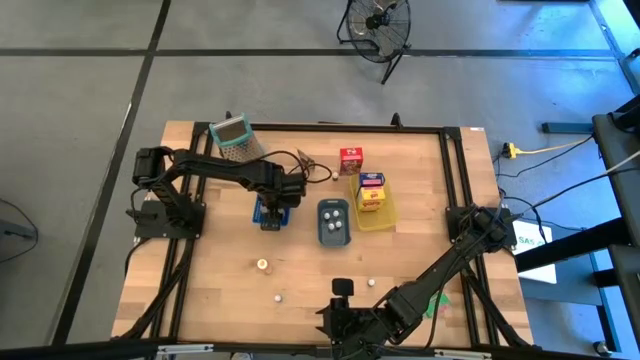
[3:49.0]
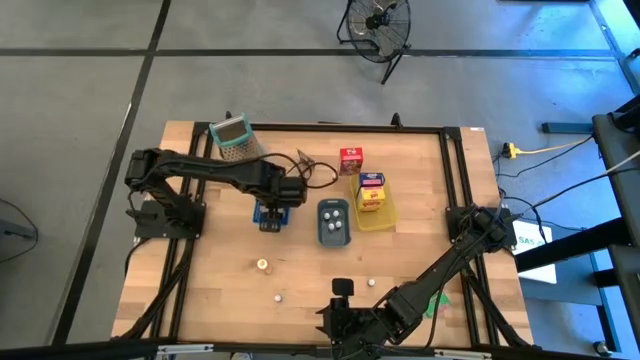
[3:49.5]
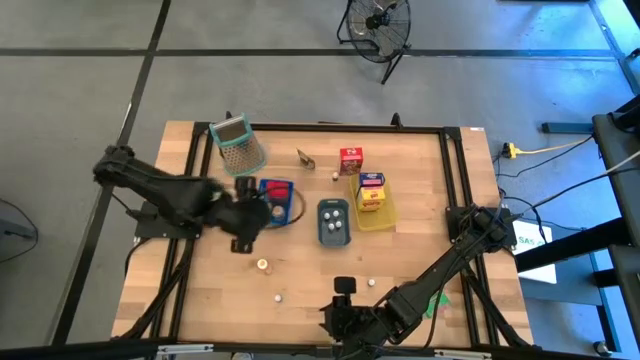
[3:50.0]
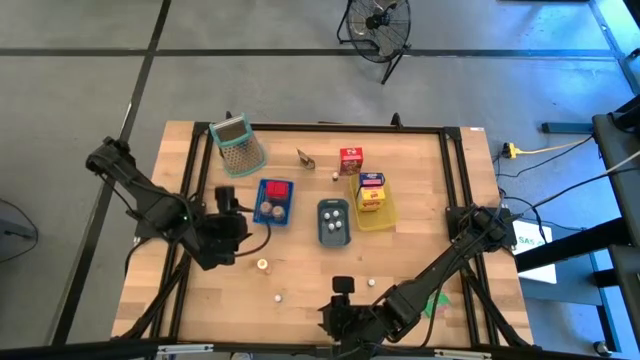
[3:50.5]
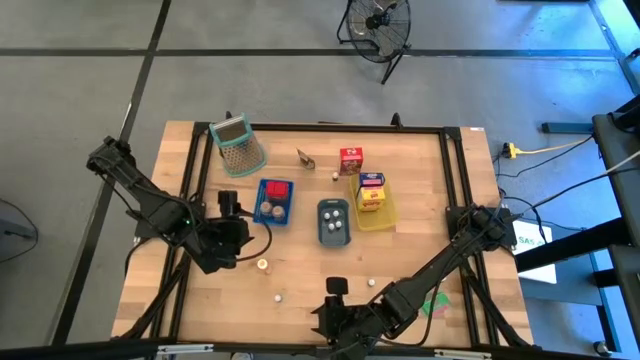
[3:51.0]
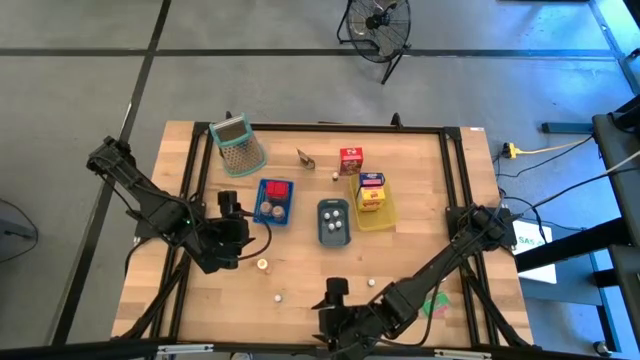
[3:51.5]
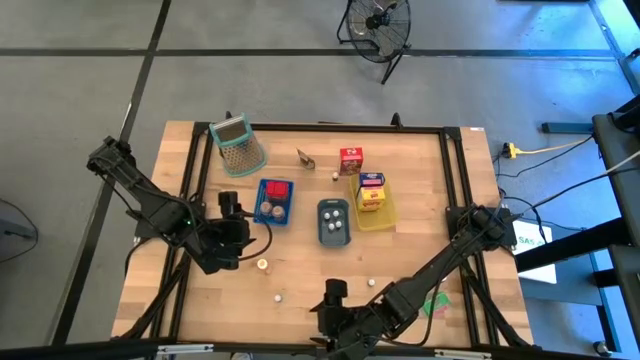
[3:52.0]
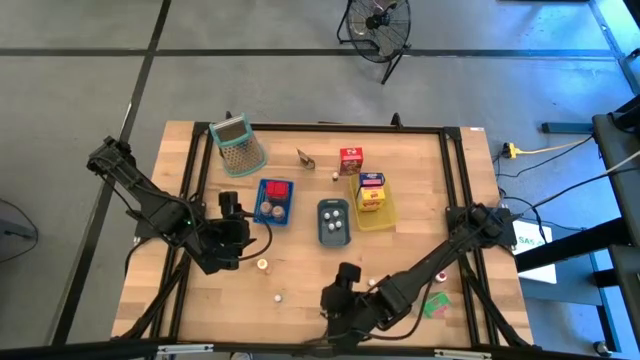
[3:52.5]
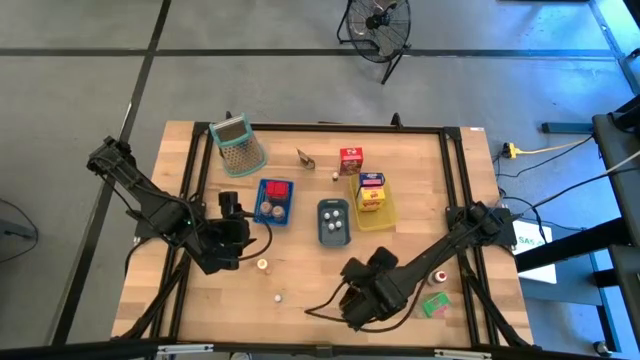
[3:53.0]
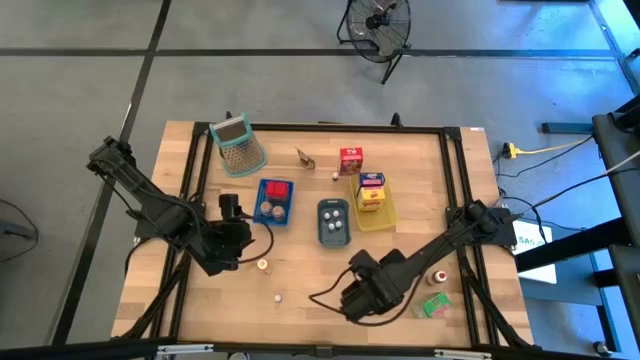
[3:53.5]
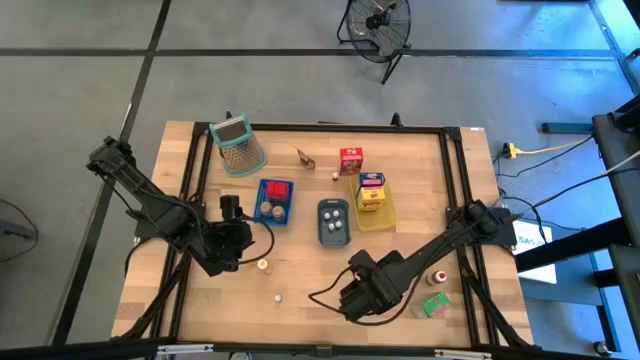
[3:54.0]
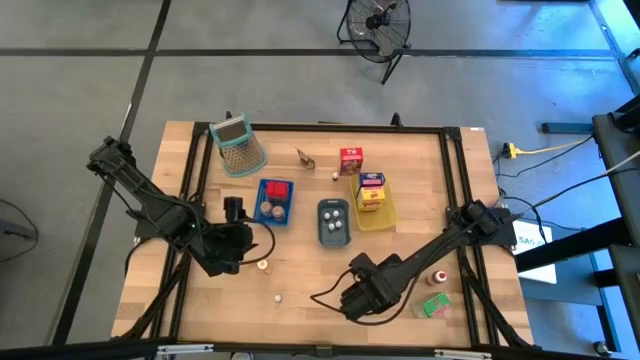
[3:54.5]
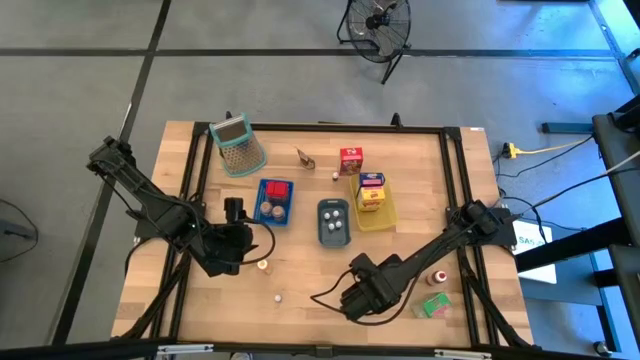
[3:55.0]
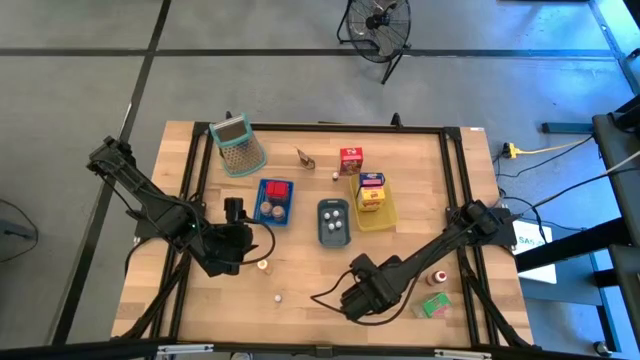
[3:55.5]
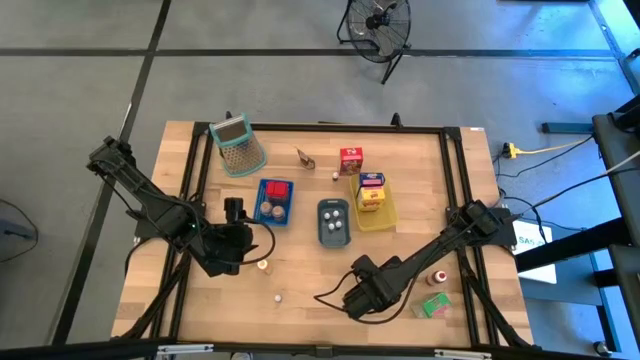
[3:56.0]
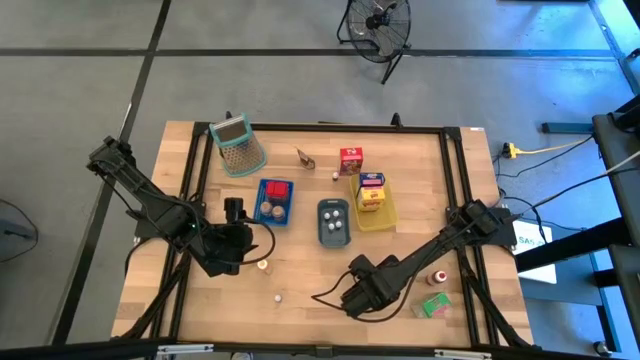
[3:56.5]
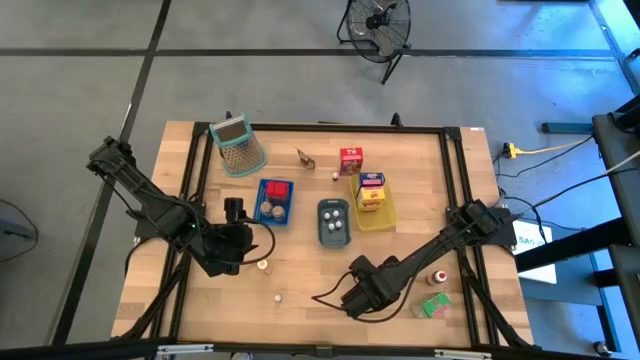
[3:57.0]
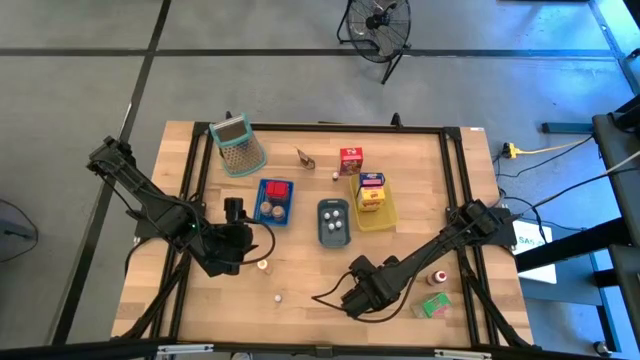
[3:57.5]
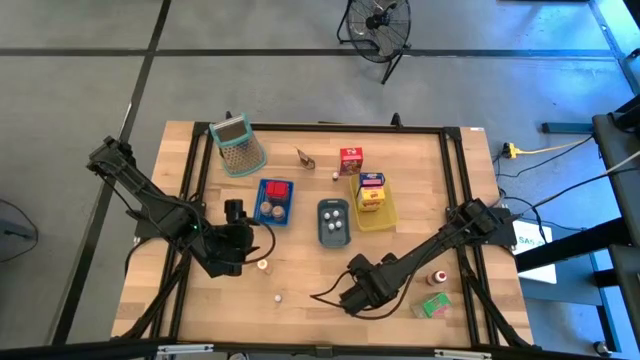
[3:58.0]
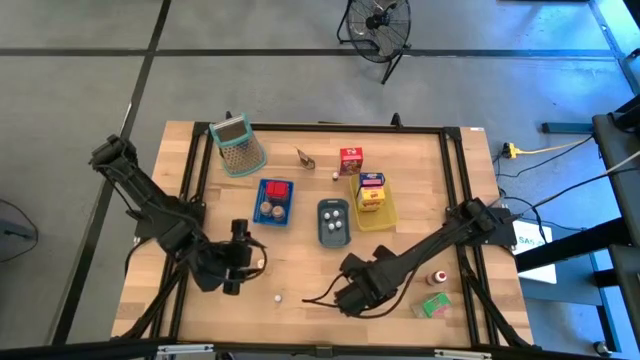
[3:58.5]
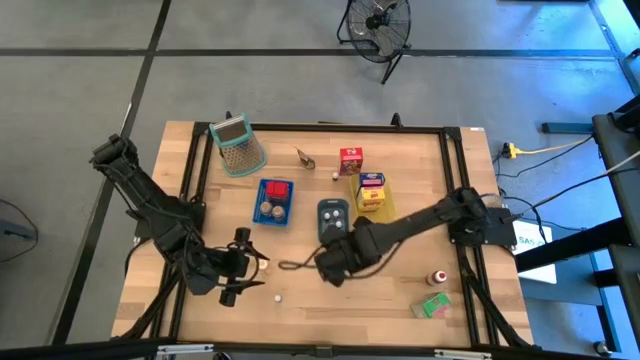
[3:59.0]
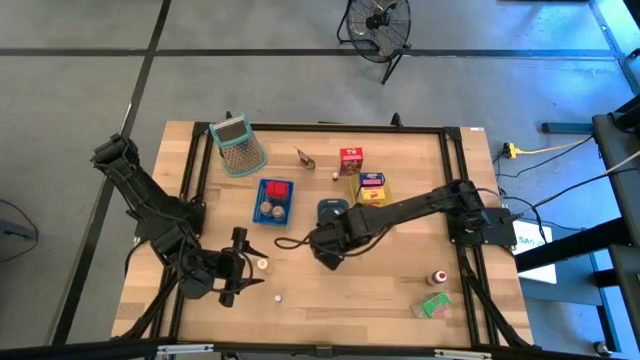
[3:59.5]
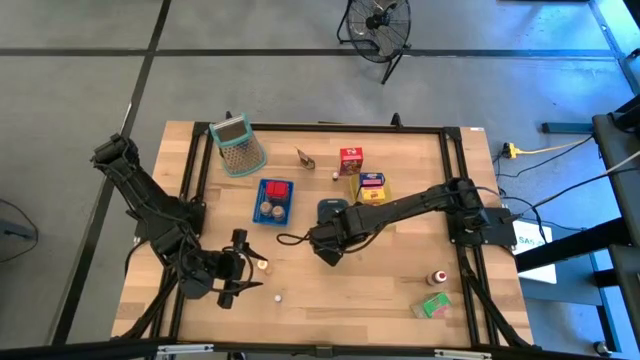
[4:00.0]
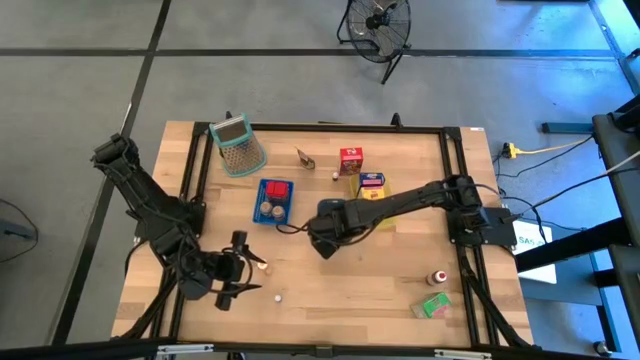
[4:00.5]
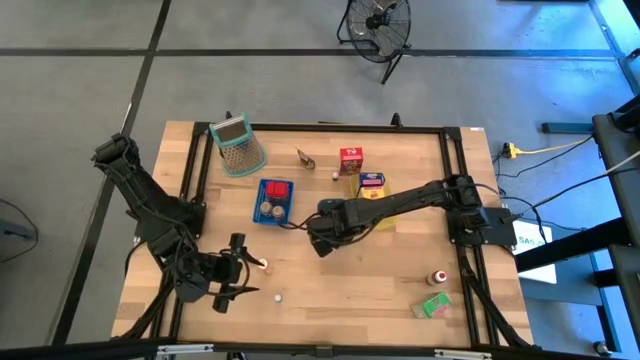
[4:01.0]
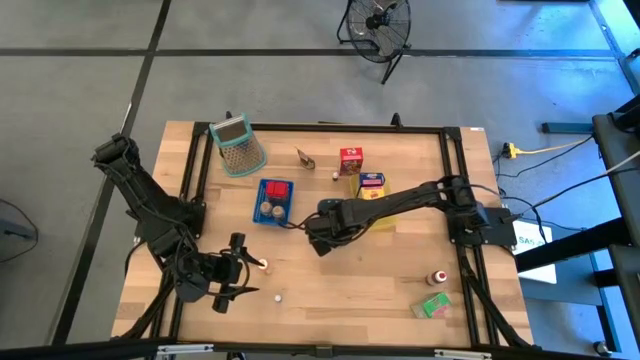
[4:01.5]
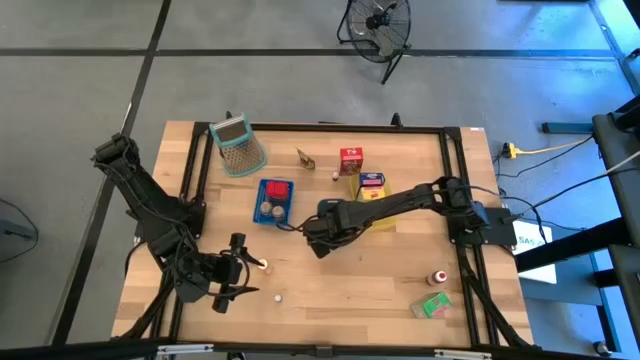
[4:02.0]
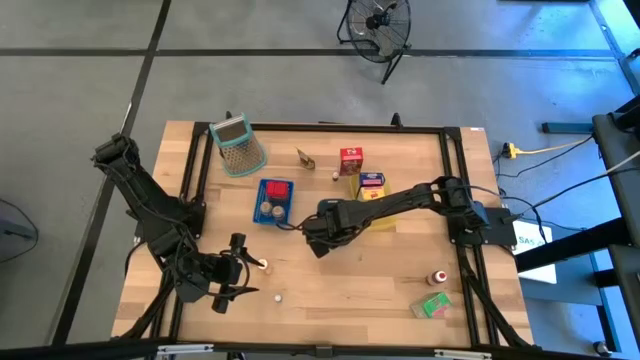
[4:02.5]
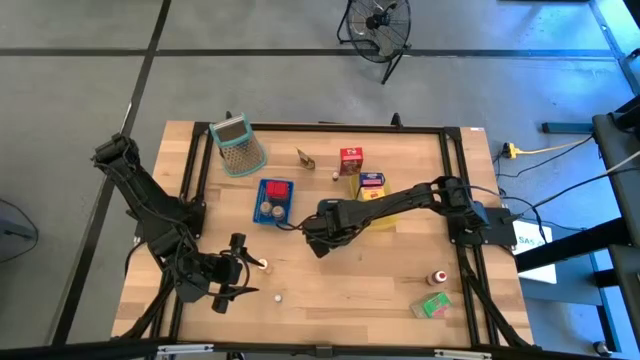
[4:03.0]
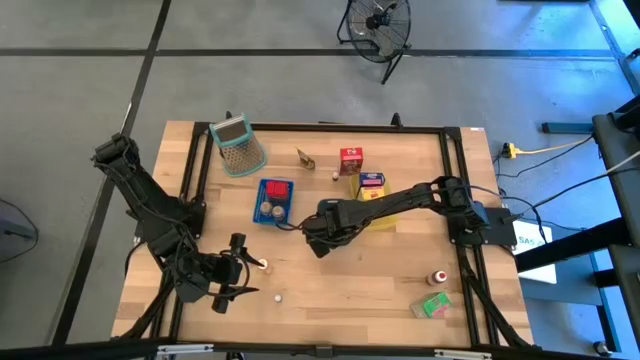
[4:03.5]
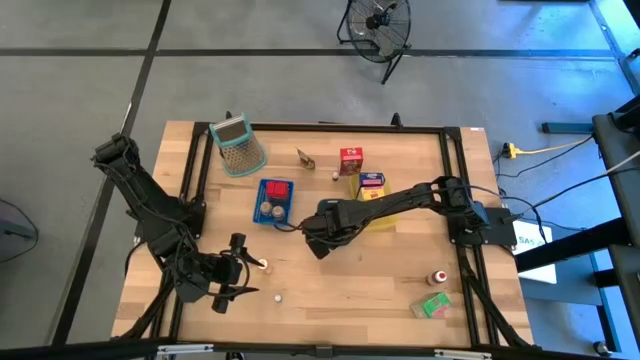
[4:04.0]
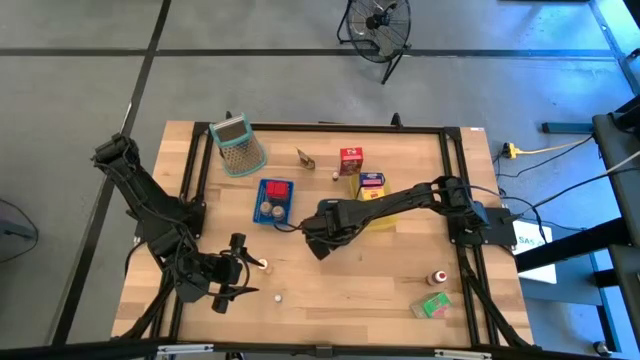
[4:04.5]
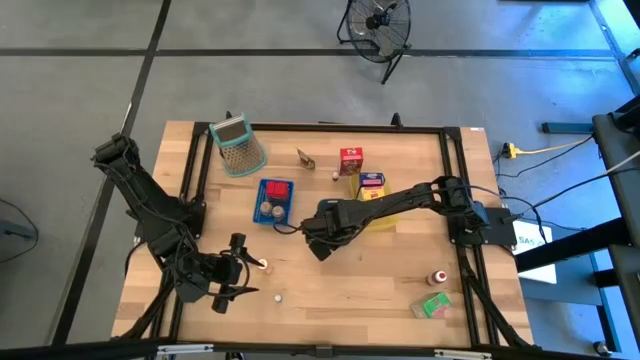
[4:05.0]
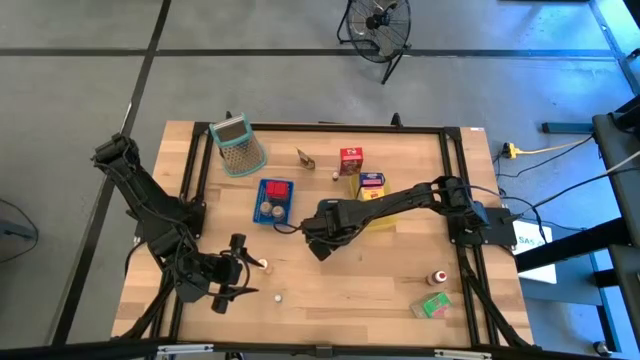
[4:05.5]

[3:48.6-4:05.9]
Task: Pick & Place Kitchen Items
Put the small black food coloring into the green bin

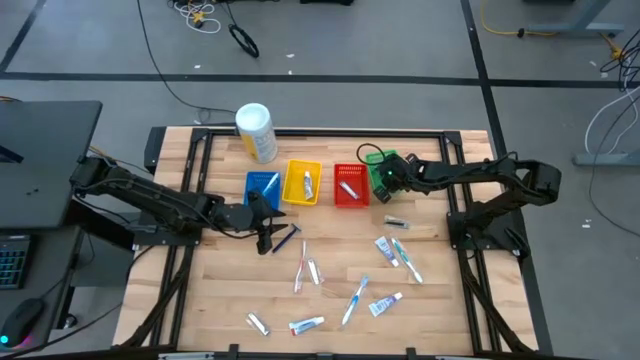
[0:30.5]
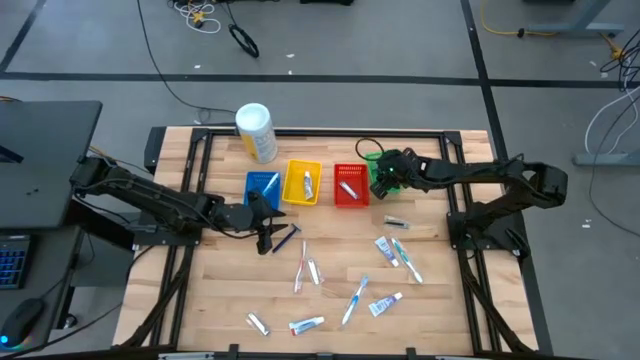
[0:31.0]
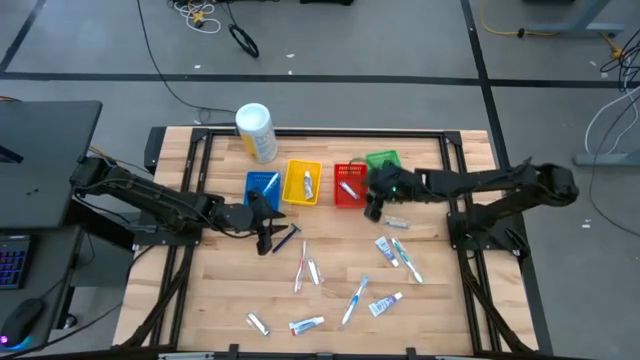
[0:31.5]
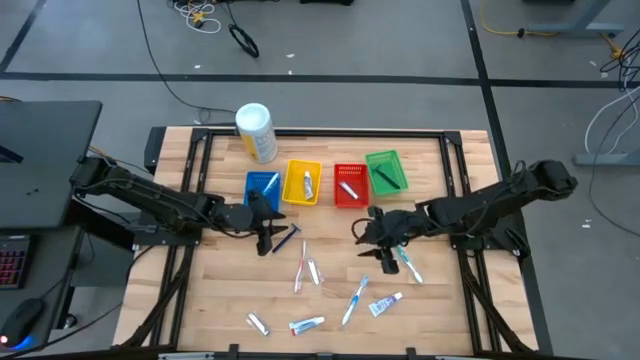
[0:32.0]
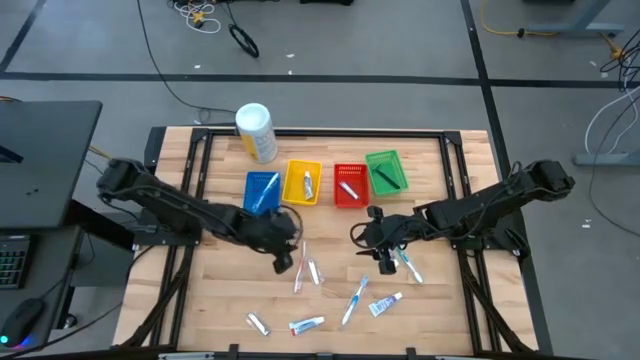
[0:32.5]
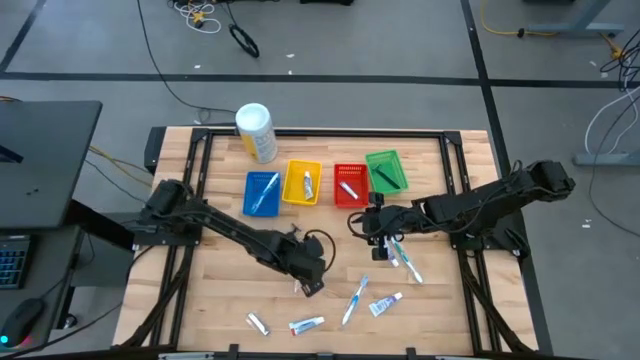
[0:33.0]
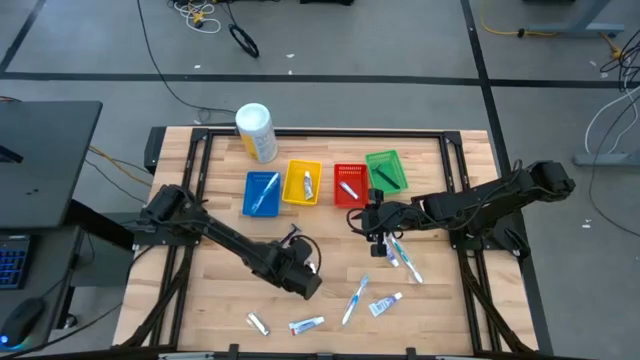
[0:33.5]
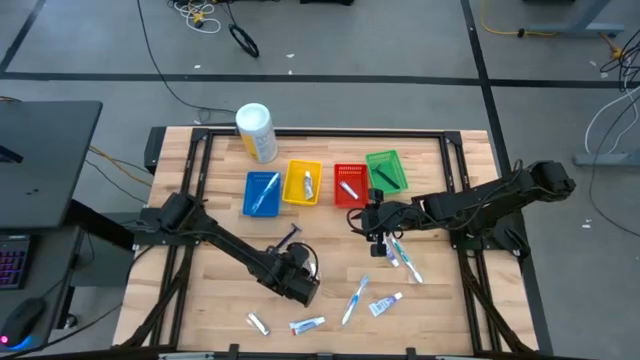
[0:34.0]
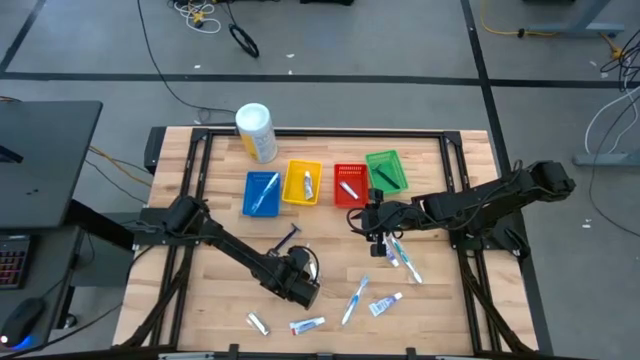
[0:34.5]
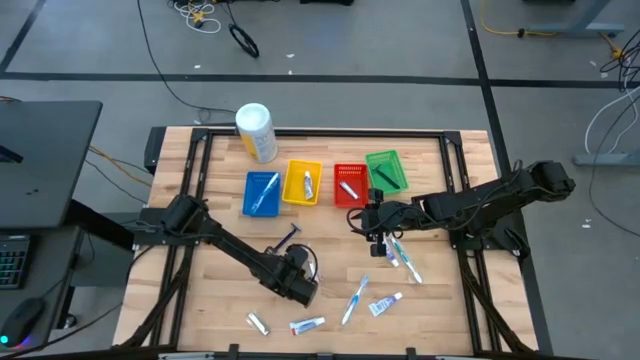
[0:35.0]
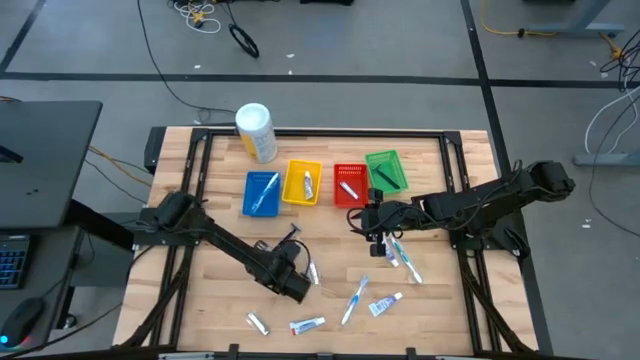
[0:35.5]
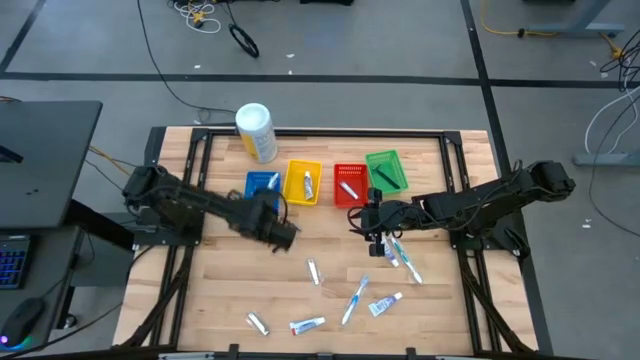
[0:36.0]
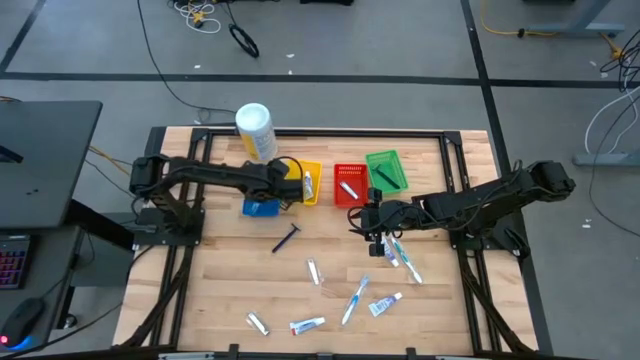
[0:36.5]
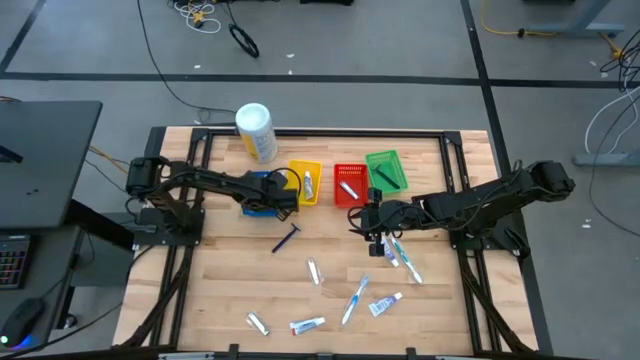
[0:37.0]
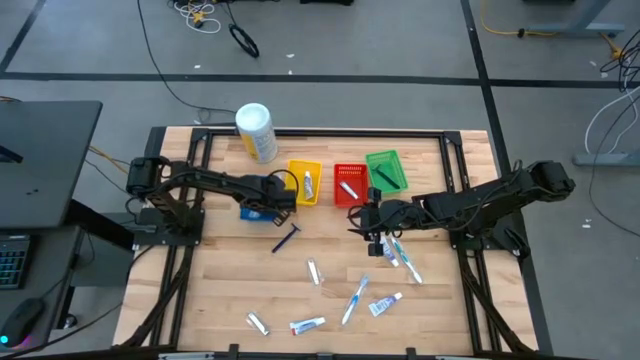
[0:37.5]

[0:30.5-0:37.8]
Task: Pick & Place Travel size toiletries
Put the red toothbrush into the blue bin
